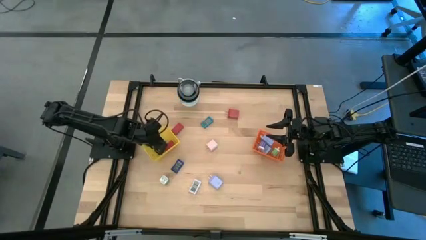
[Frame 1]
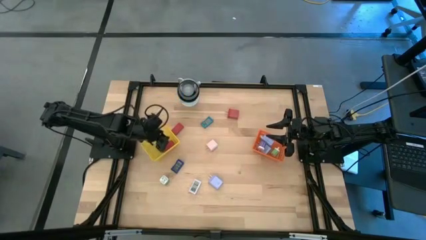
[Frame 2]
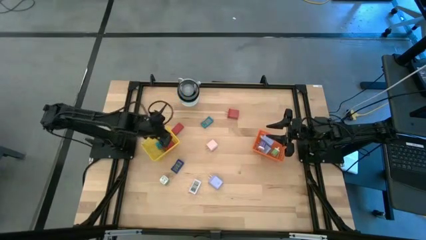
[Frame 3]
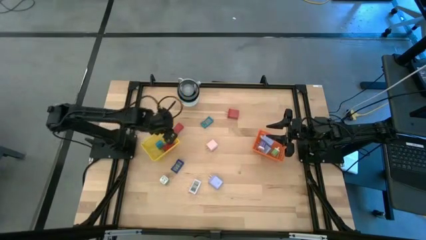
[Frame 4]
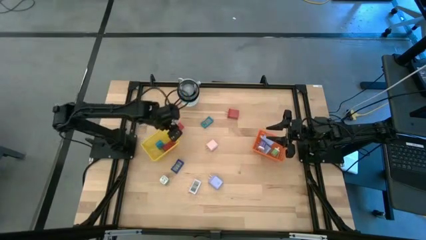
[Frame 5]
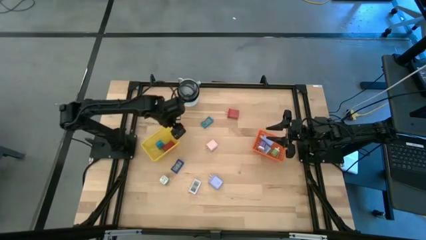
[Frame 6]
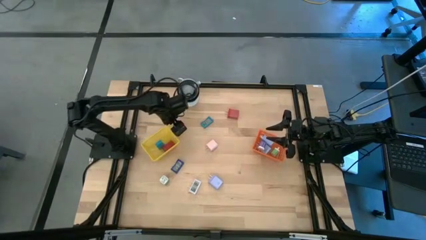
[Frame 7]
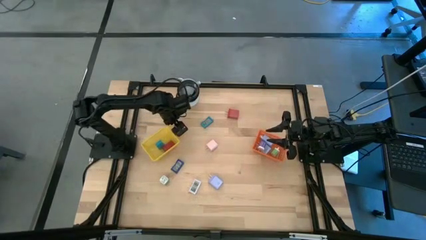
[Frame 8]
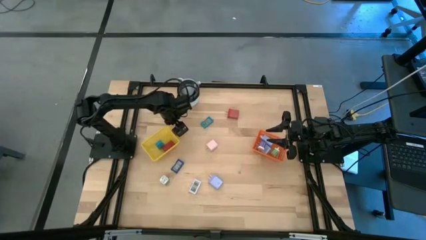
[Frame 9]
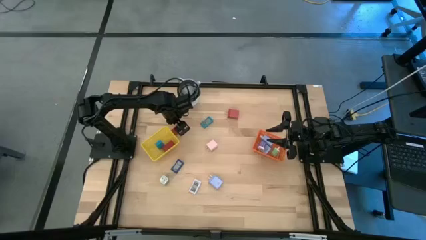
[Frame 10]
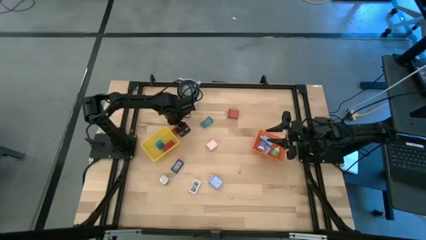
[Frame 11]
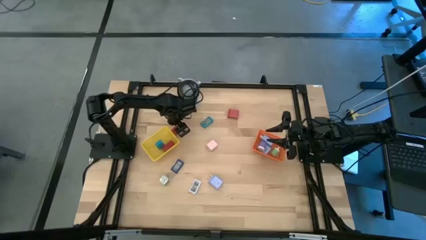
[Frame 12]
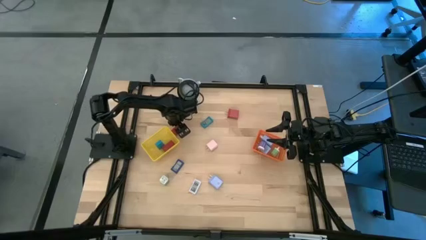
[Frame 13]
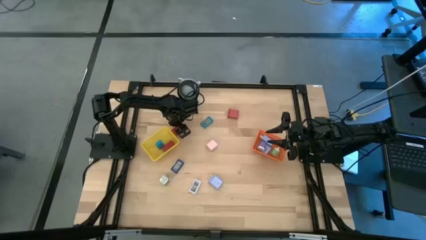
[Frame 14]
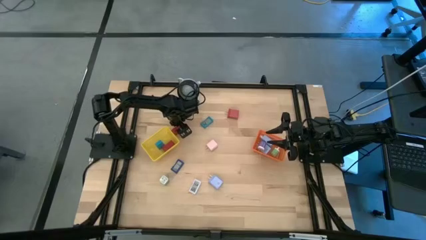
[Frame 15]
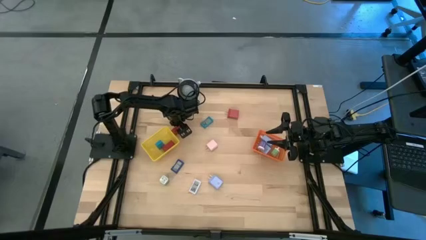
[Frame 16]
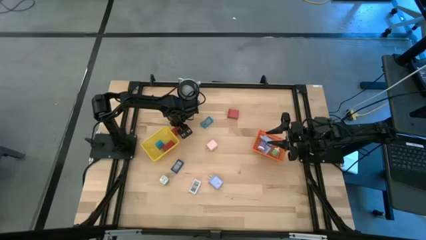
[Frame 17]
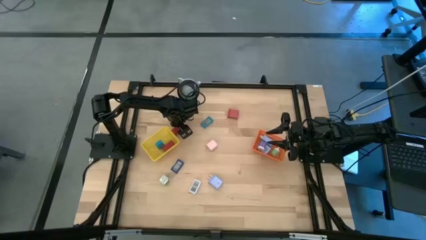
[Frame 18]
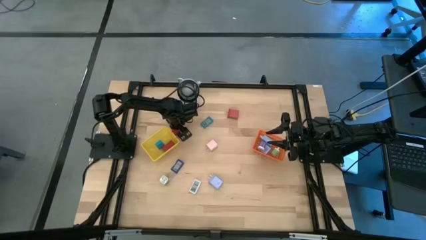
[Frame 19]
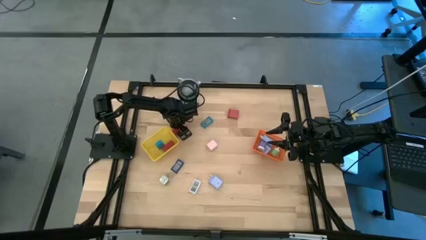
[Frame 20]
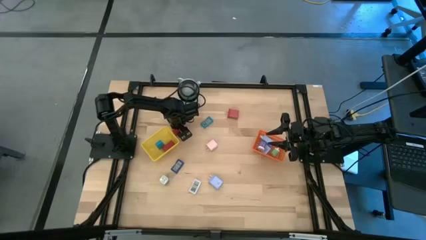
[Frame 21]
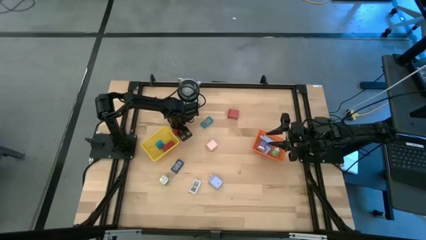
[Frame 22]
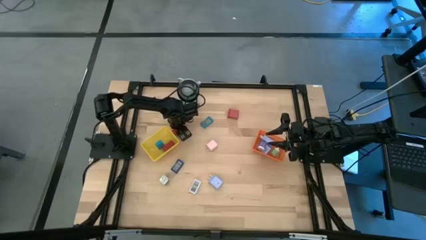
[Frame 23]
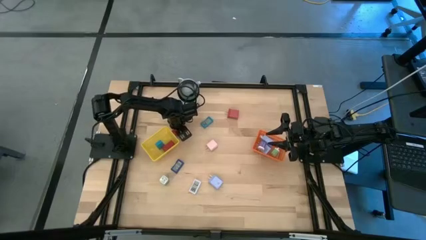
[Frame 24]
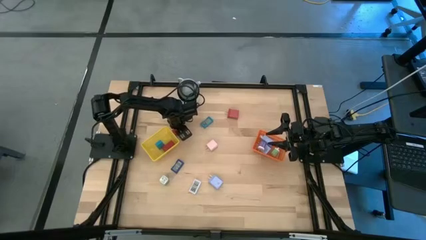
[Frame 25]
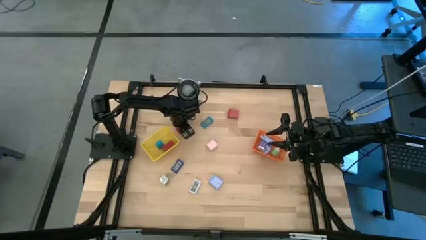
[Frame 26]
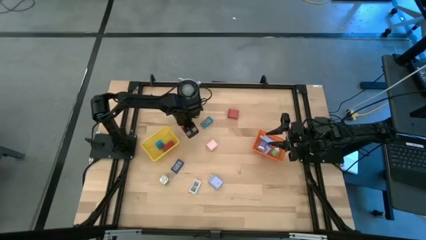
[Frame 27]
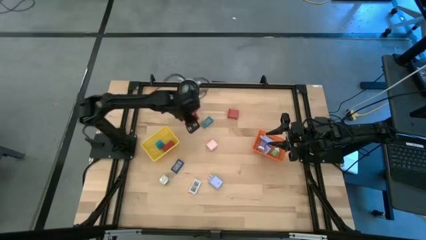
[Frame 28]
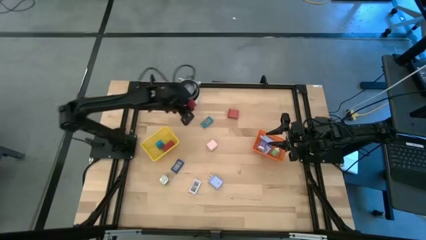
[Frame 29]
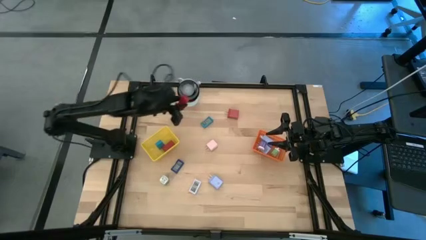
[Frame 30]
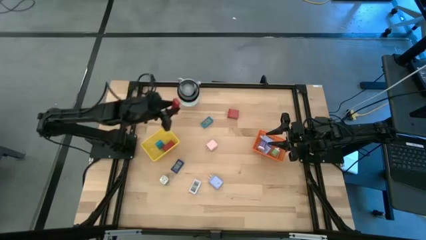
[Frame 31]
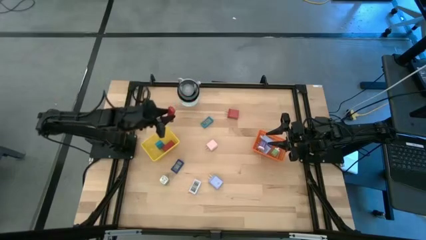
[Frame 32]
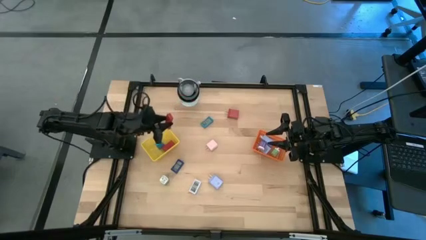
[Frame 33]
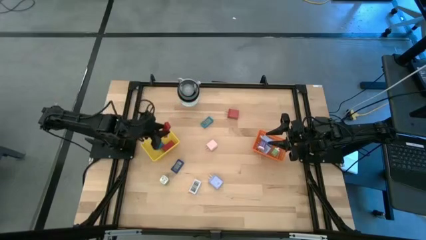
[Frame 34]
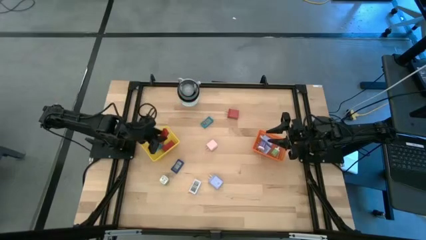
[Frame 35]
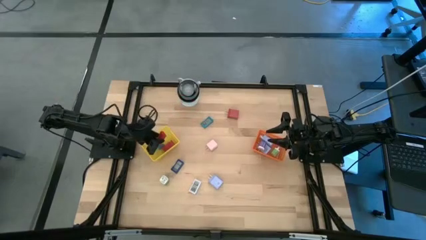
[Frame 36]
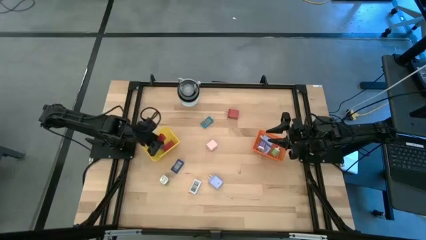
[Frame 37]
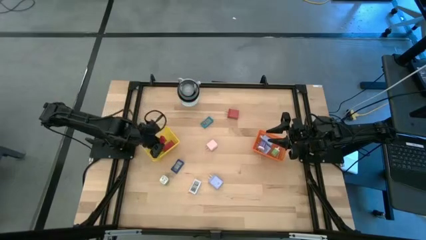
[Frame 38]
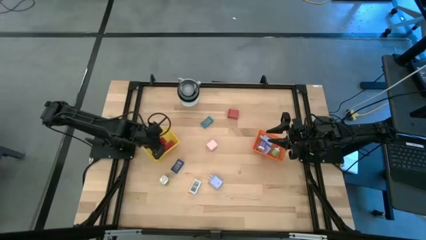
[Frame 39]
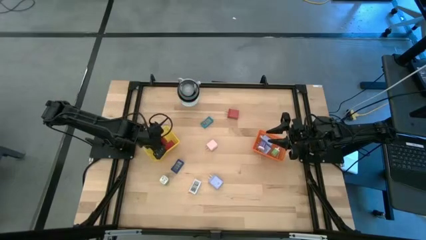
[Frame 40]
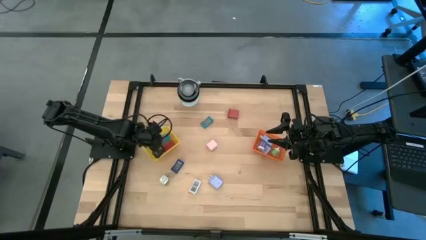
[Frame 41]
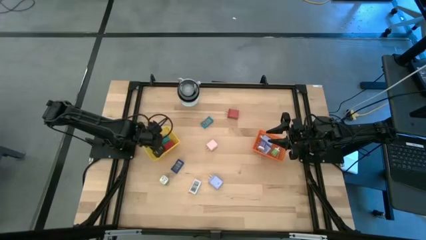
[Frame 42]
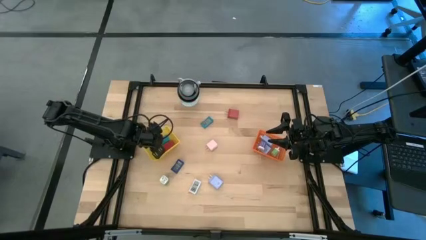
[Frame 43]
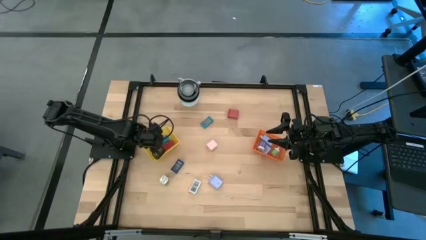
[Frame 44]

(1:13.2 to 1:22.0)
Task: Pick & Place Office items
Put the red digital timer into the yellow basket

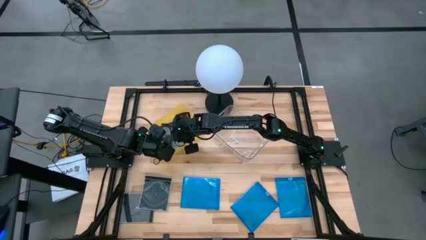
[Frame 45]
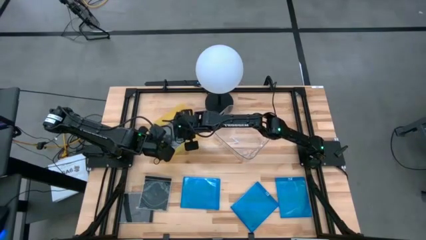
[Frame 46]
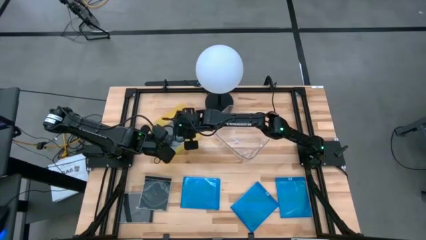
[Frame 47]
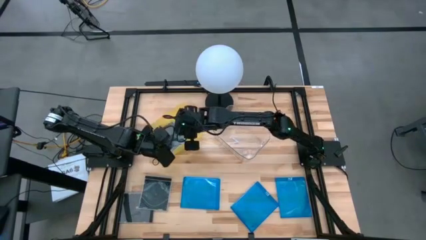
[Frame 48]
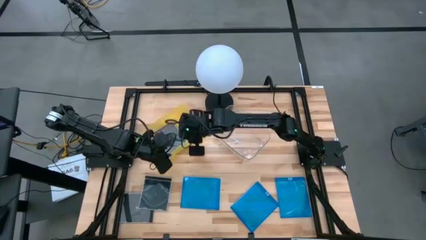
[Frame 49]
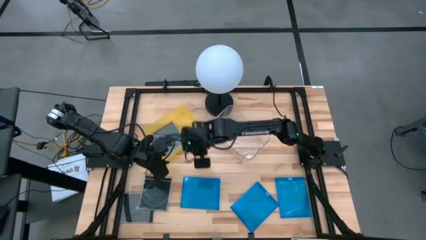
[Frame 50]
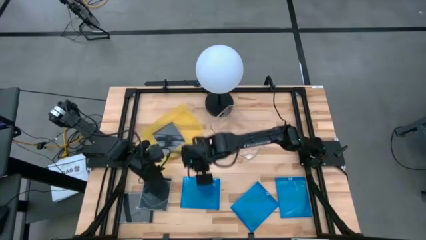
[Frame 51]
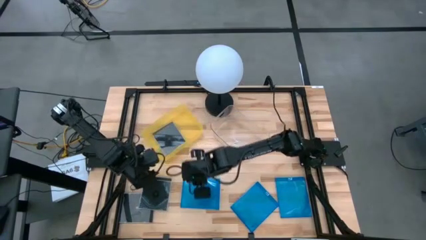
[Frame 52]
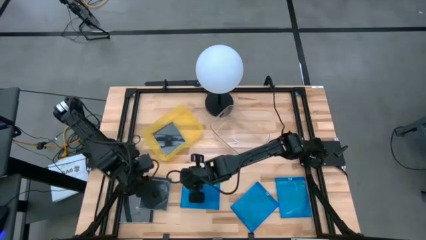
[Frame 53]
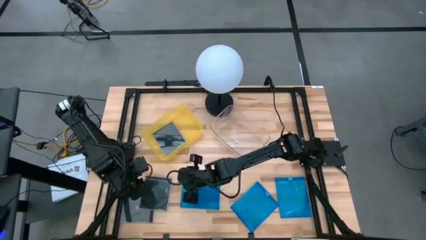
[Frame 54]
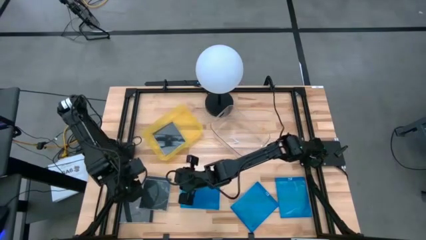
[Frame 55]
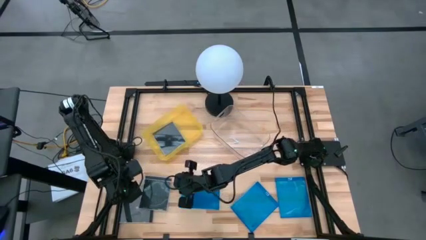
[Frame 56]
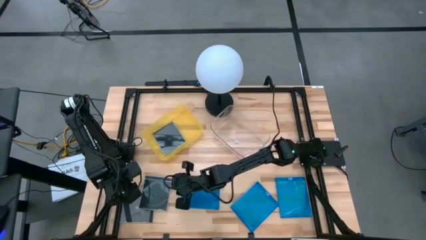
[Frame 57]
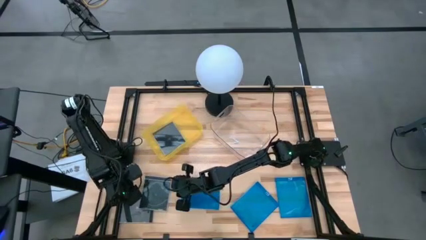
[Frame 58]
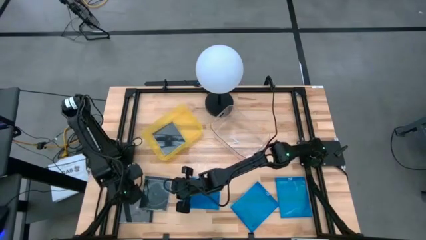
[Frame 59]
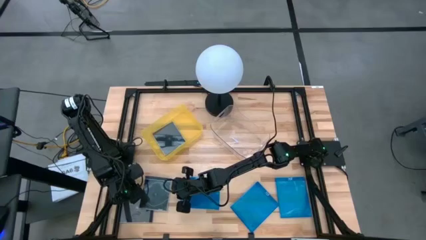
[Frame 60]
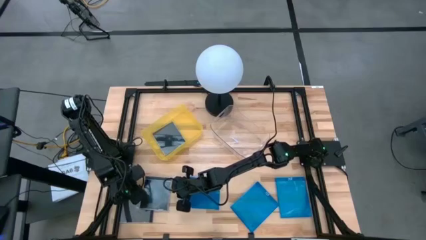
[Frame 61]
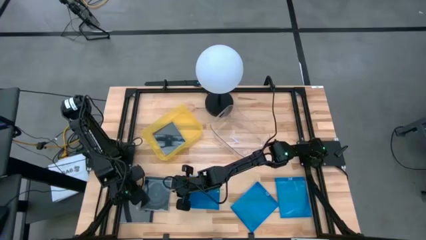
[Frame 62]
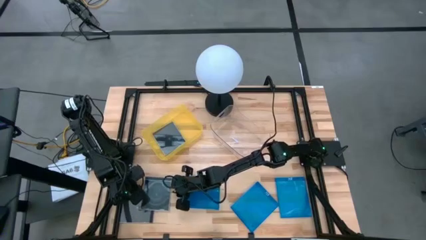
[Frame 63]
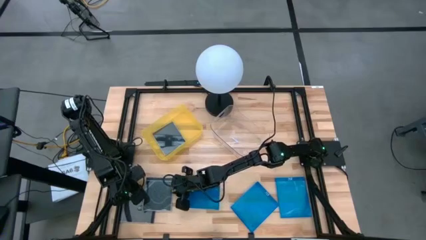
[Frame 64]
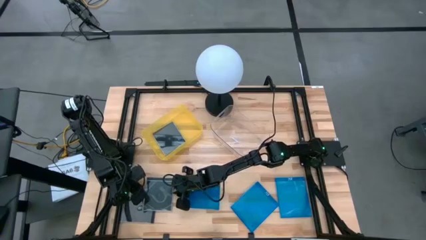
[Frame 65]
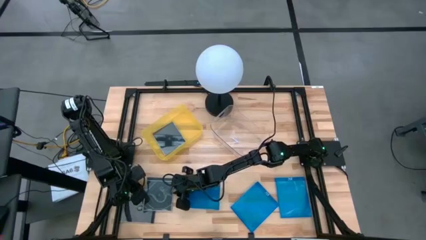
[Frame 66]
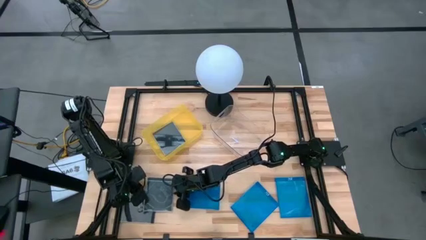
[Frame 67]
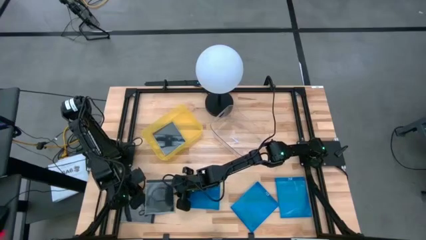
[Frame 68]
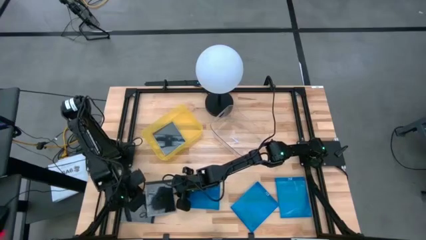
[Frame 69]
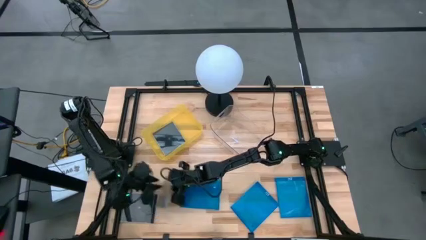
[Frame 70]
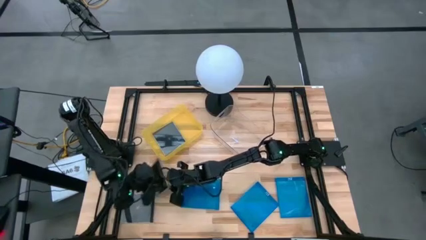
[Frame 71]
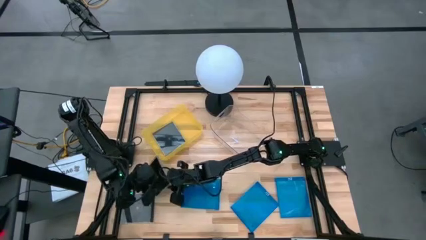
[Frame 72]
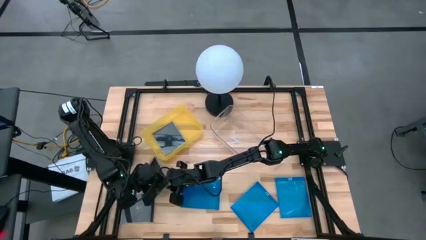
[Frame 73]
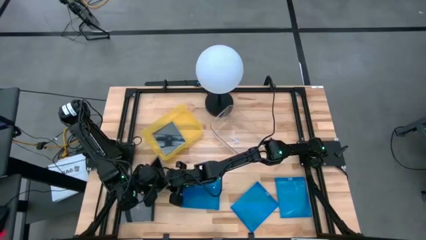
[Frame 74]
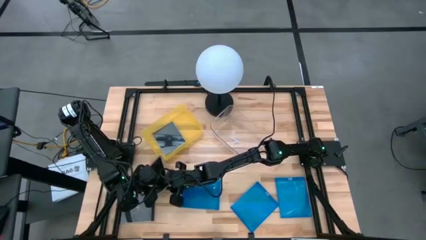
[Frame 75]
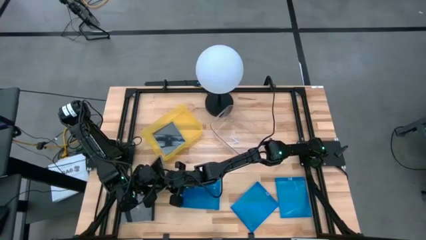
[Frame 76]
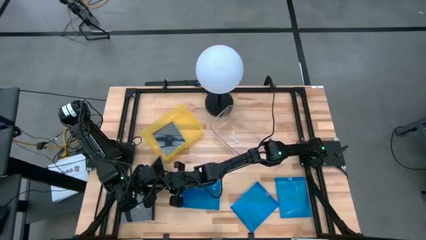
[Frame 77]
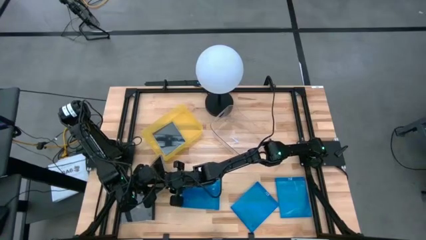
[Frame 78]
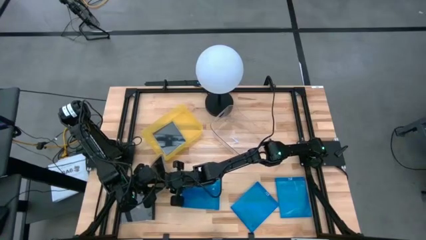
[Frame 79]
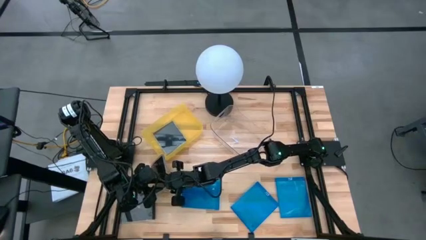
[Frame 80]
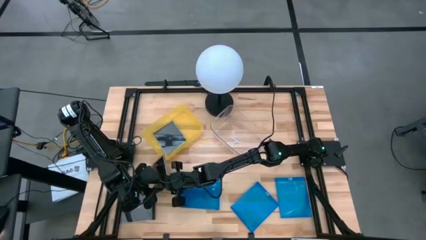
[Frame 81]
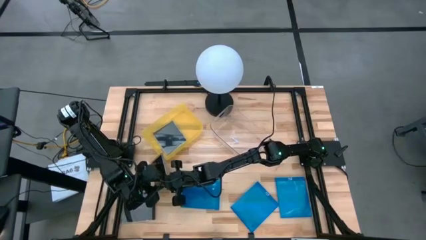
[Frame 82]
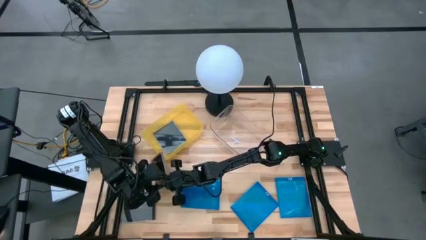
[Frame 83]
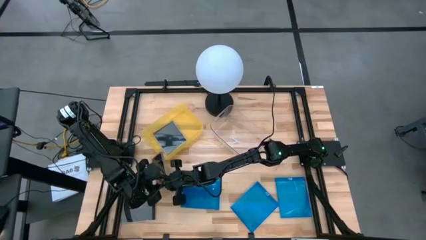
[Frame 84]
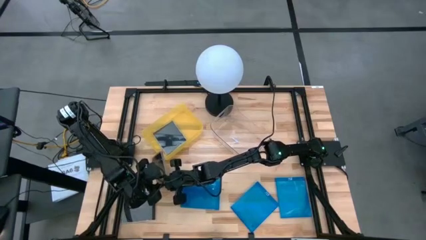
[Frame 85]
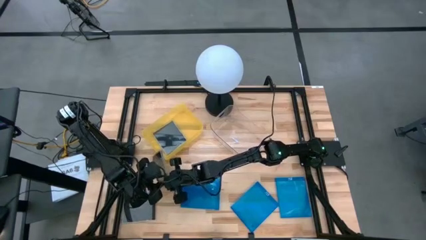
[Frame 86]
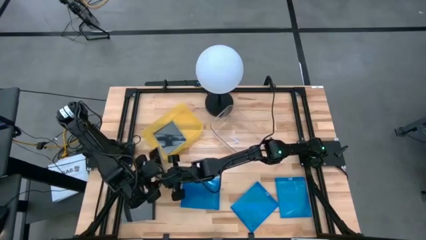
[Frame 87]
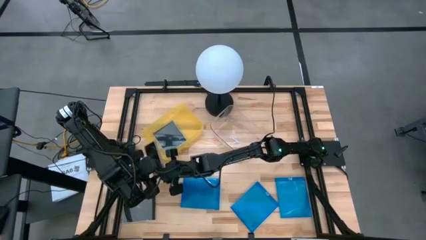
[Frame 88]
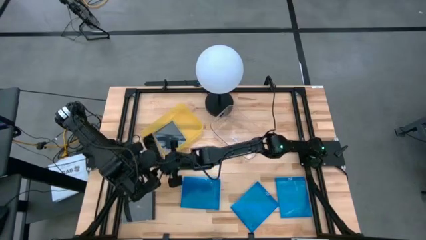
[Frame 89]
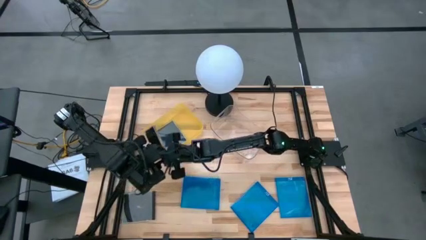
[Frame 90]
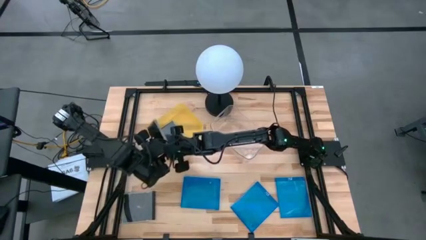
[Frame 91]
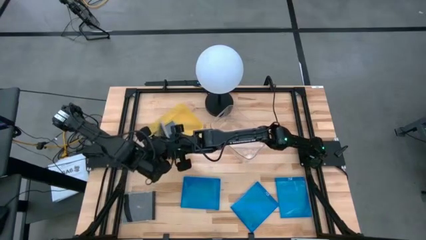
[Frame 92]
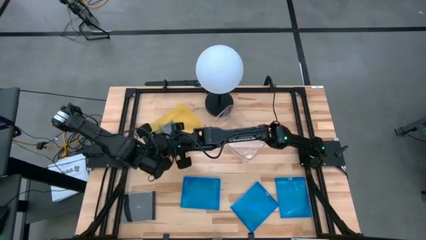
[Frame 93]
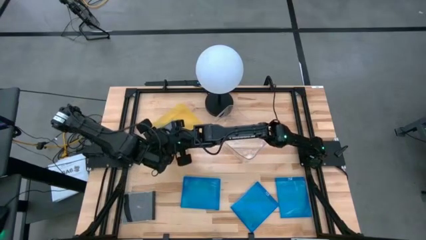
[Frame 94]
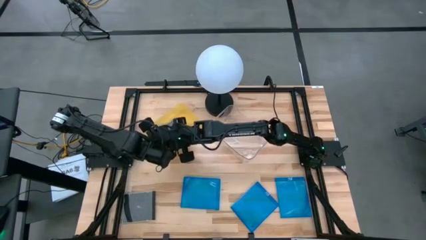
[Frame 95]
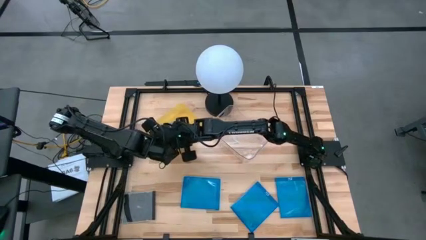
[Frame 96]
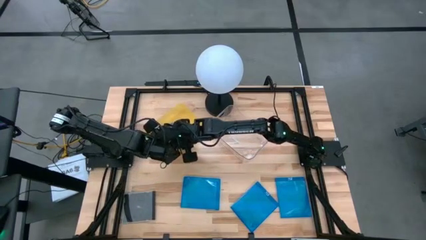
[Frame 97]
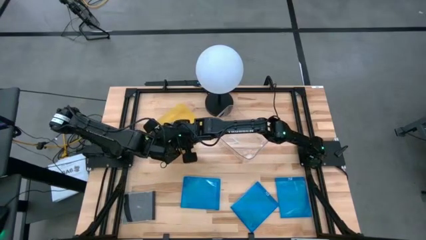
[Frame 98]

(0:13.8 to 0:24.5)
Task: Pick & place jewel cases by type
Put the right black CD case into the yellow bin
